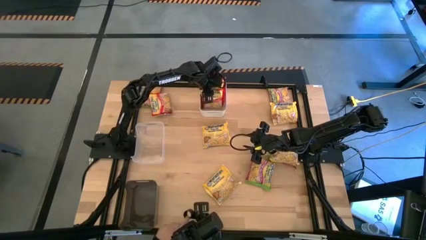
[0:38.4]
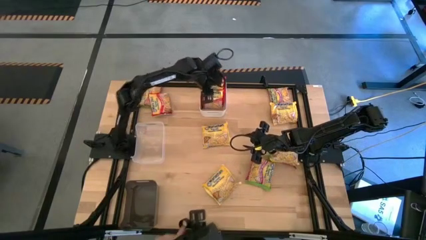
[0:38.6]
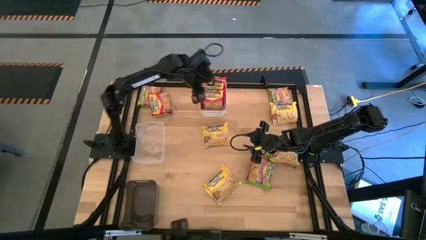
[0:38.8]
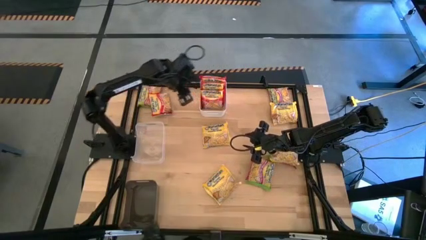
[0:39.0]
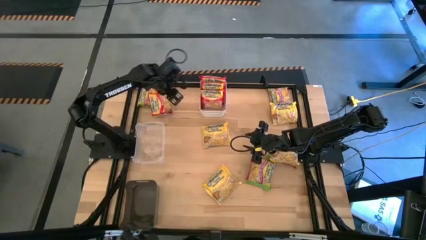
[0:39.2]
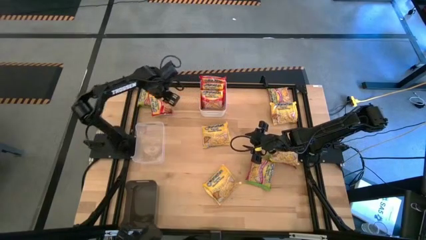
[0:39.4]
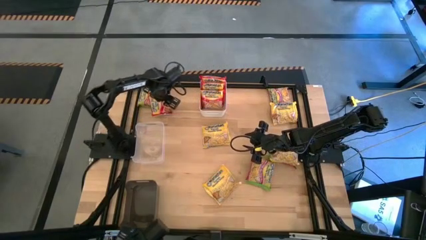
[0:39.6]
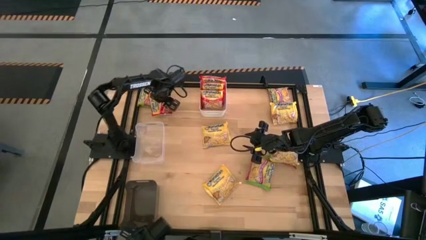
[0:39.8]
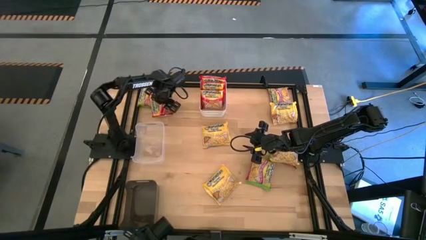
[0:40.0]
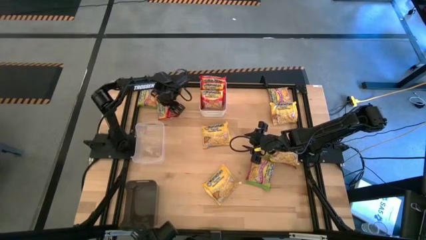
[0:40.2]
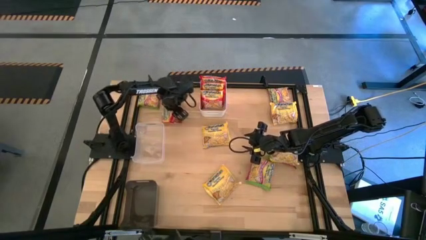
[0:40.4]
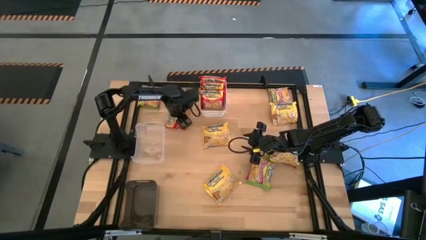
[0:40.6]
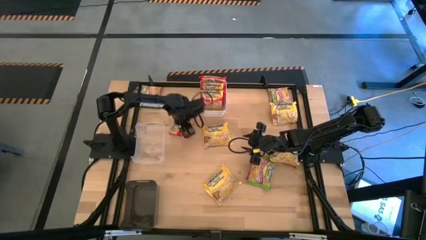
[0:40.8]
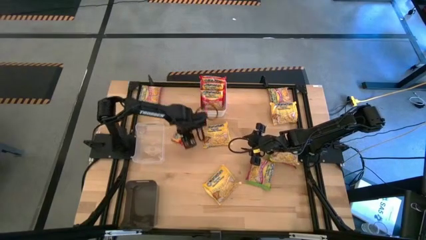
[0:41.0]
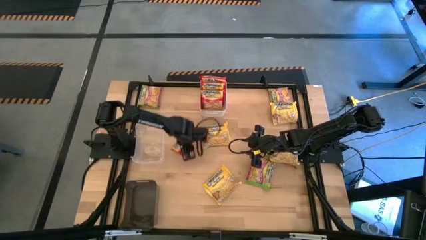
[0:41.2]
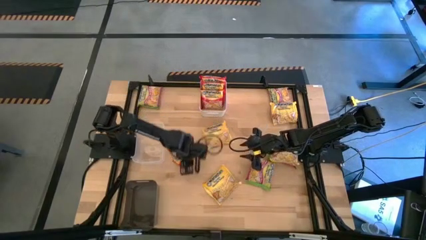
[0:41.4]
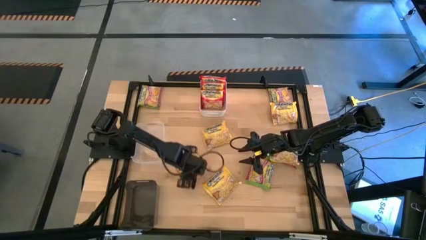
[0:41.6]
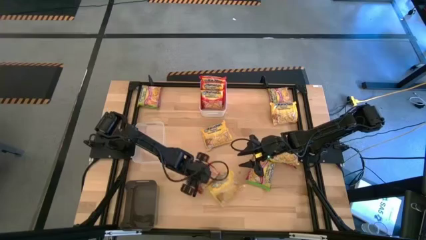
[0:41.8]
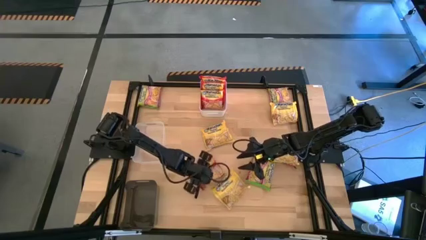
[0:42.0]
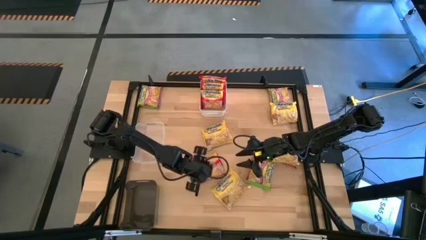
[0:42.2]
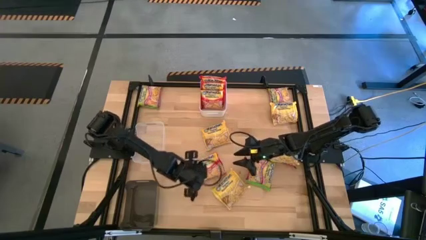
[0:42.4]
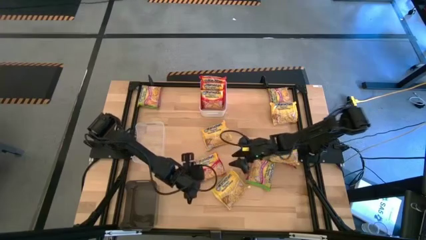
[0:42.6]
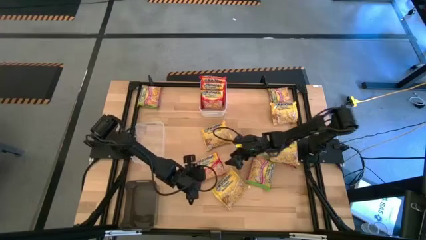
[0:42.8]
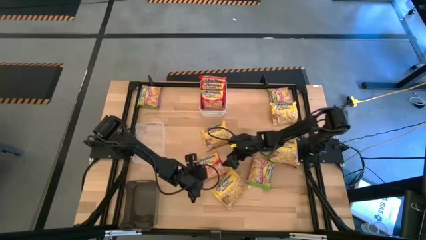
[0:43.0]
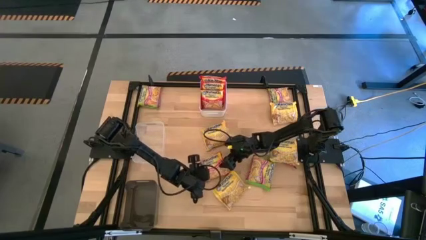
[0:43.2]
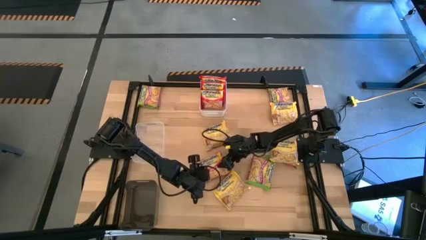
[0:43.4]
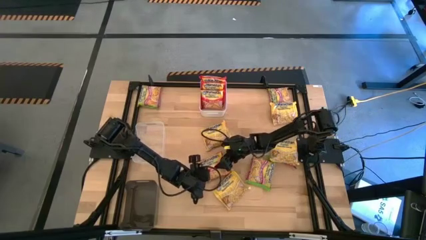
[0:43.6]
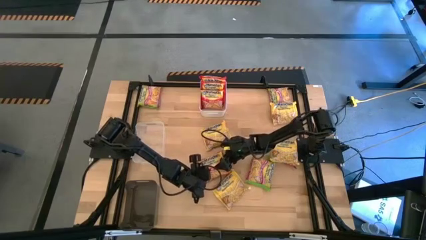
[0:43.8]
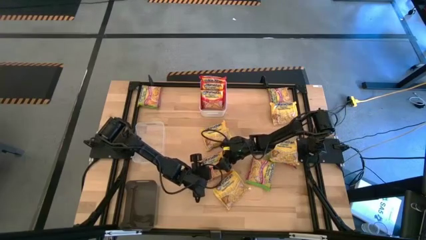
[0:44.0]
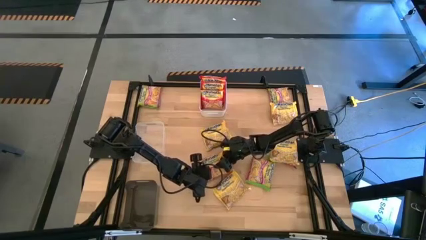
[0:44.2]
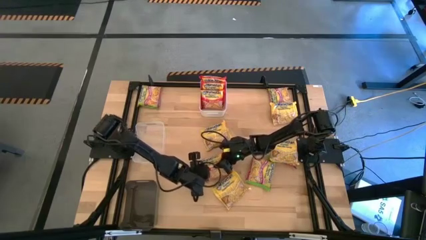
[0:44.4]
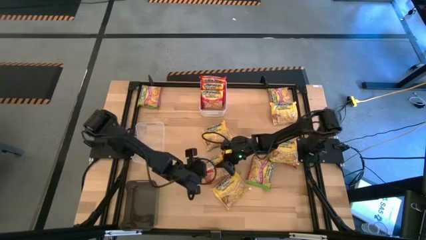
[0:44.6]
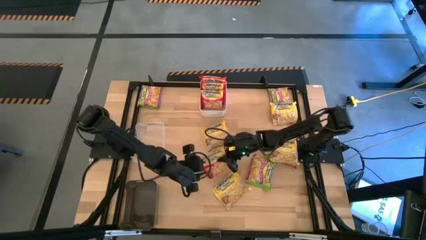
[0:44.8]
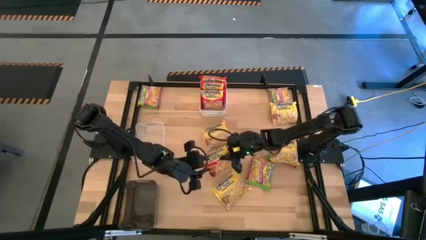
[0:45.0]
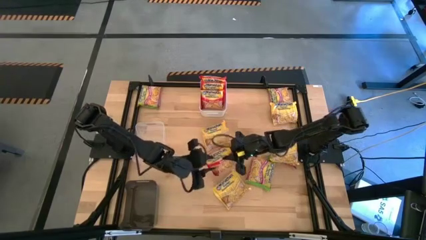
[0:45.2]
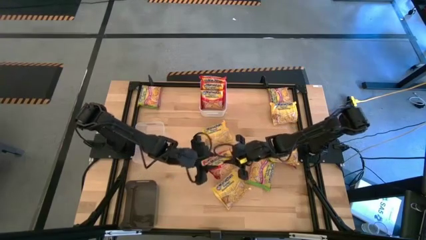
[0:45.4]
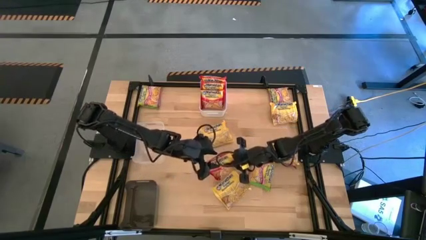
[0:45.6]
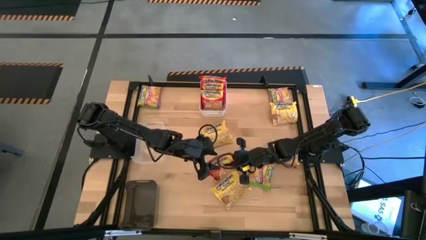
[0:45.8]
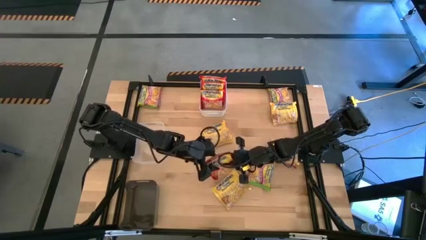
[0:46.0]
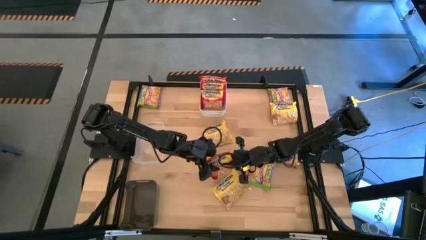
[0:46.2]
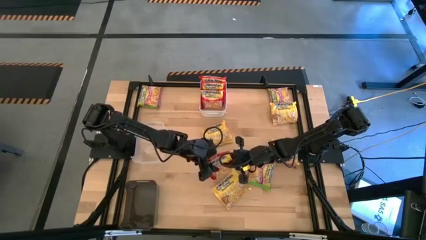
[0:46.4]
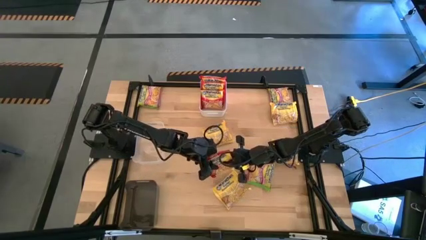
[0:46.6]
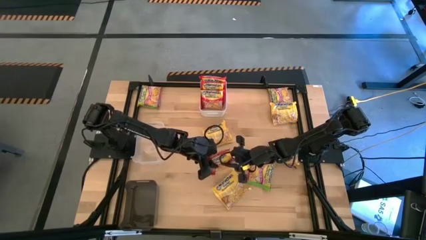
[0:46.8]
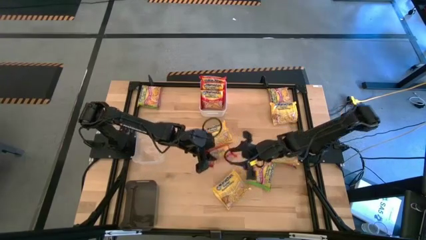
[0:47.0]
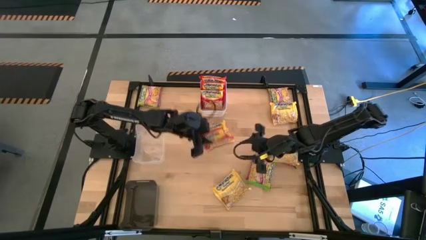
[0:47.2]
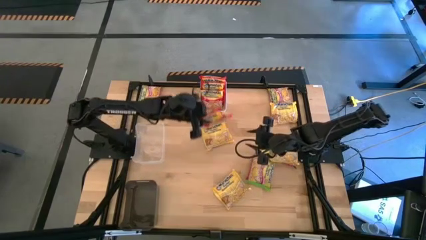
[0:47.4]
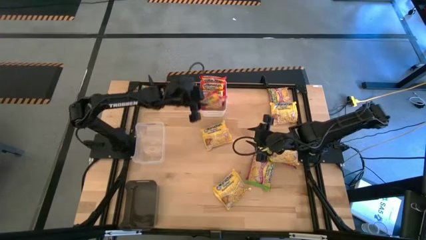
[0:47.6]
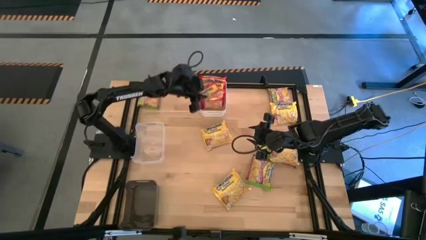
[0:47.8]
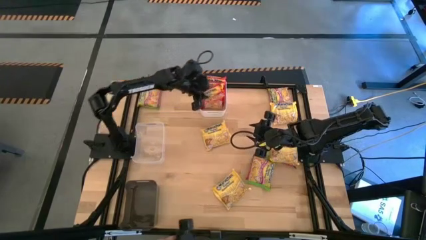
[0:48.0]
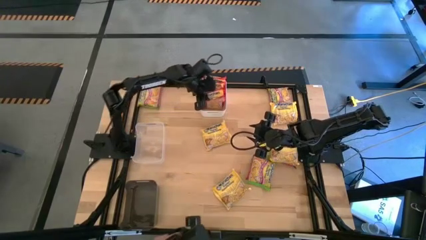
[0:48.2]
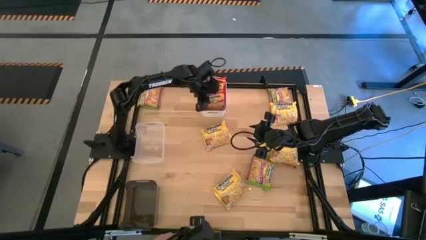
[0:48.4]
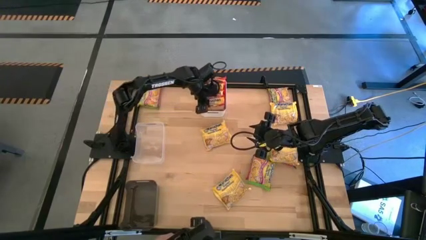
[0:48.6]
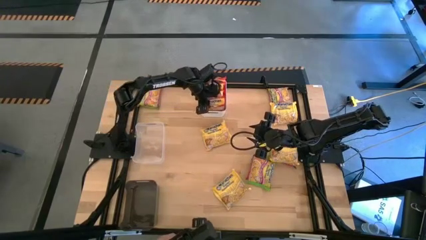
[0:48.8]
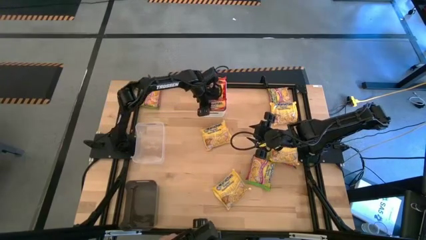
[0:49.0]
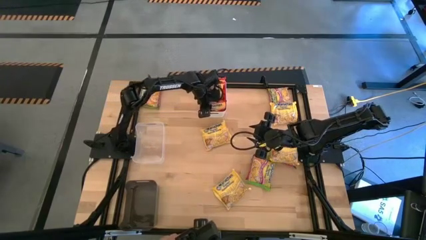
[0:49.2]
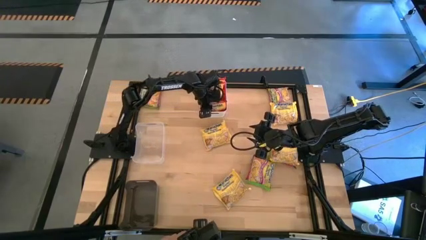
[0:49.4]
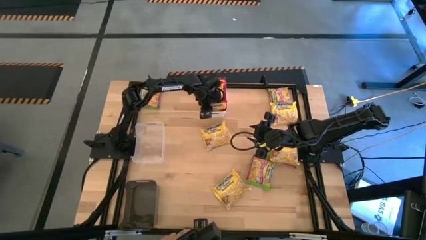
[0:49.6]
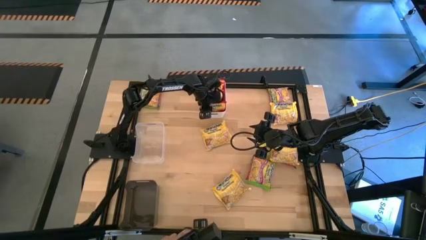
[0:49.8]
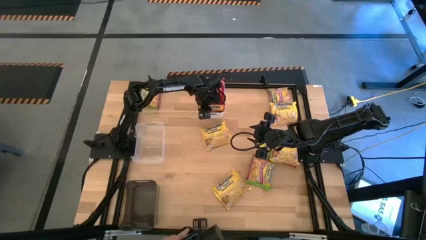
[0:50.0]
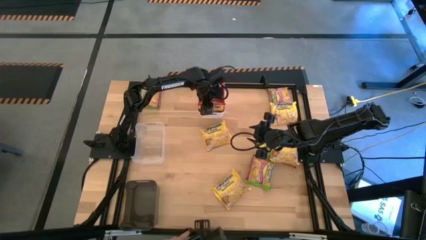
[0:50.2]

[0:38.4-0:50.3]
Task: Sort Maruchan noodles
Put the red noodle pack into the white bin

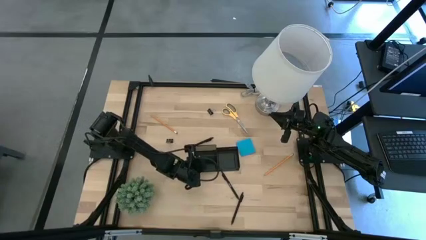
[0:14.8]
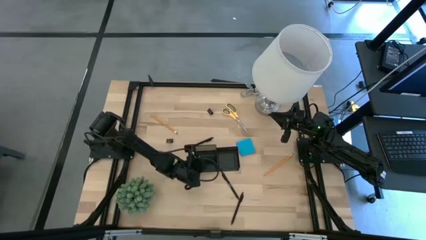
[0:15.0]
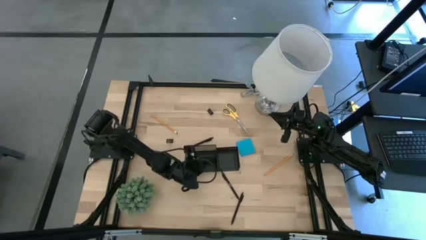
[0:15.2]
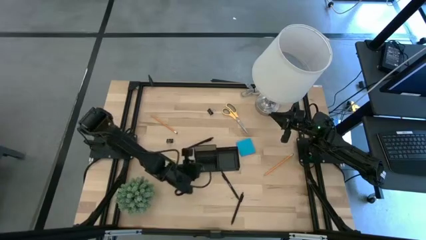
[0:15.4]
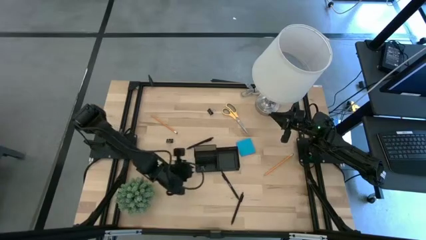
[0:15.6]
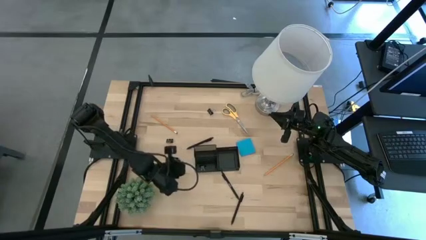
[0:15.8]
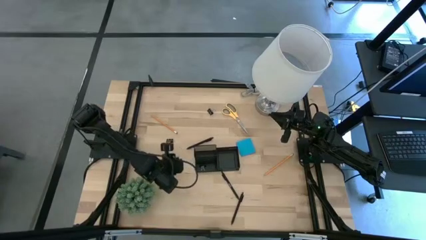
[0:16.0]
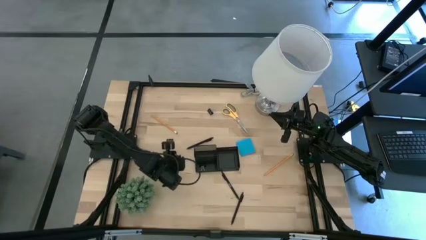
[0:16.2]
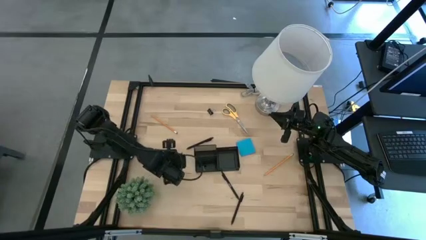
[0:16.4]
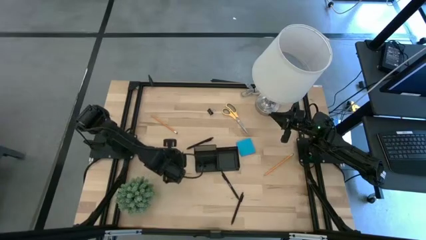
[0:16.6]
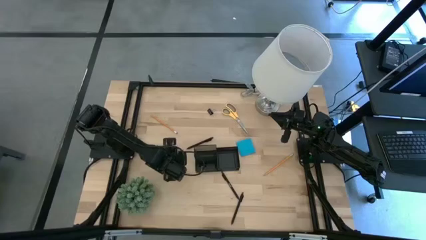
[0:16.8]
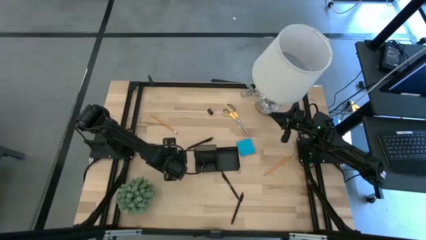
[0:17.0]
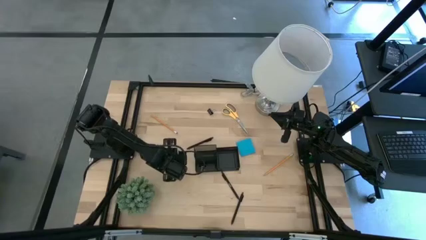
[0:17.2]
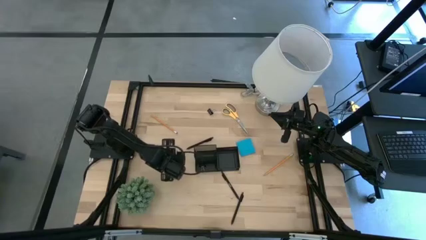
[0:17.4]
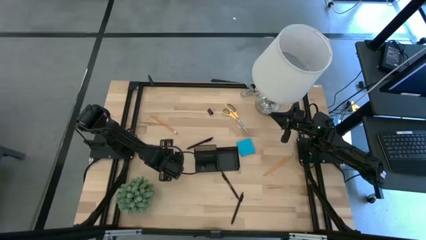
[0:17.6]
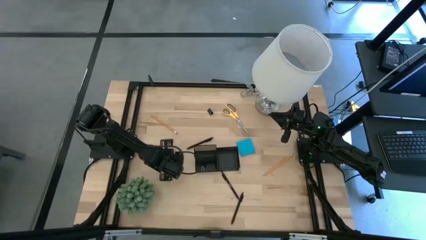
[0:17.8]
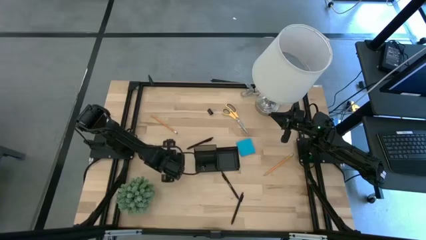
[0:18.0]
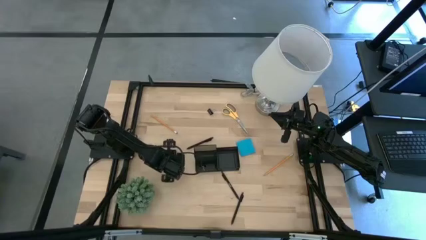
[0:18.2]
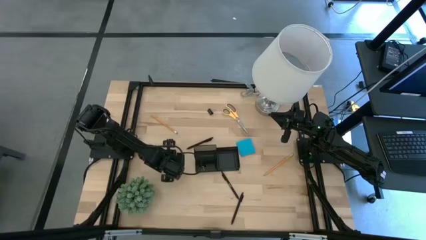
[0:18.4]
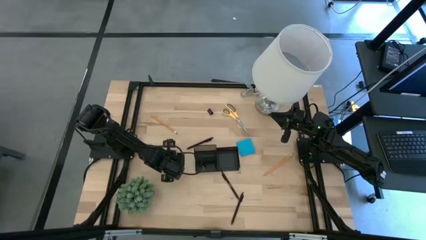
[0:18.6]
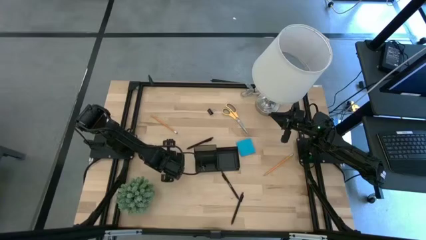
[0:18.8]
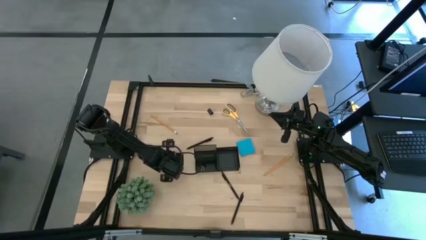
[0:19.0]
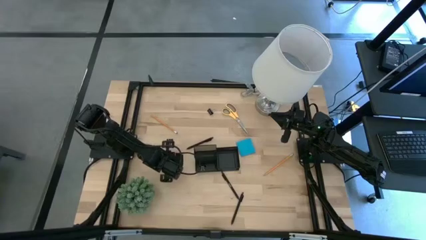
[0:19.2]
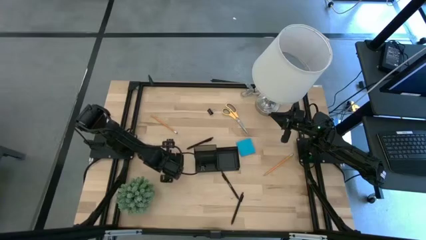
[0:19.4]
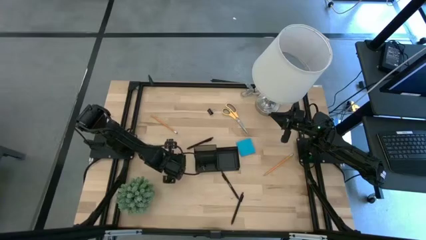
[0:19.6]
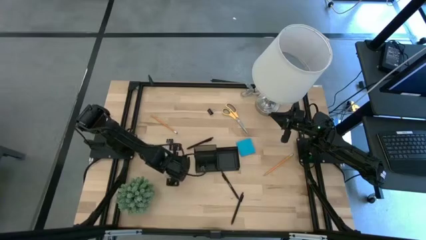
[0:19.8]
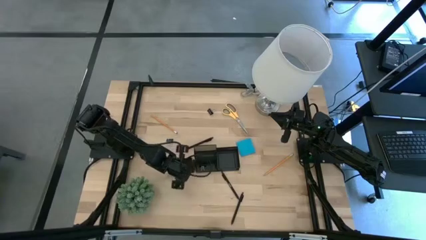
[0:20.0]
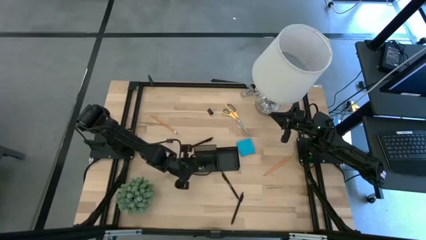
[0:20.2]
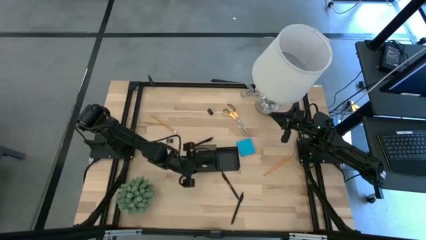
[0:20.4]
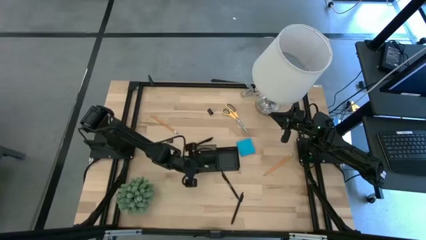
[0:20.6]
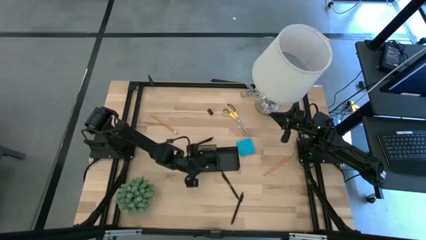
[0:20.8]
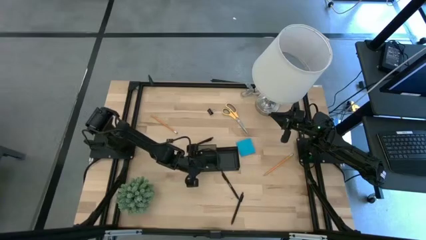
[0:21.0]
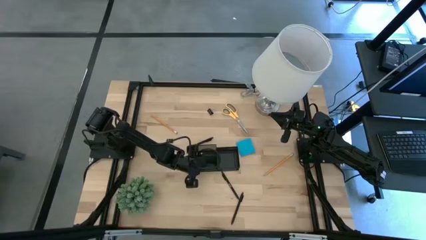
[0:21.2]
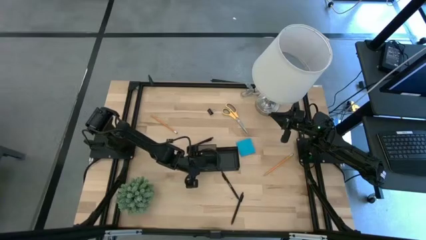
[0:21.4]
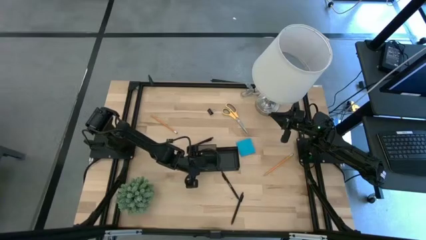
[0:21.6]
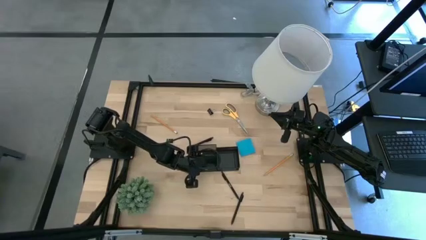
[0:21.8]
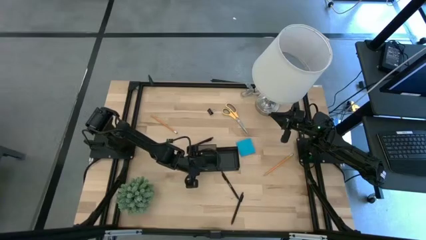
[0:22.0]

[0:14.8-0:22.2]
Task: Pick and place office supplies into organizer
Put the green eraser into the desk organizer
